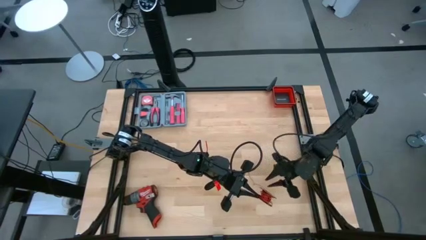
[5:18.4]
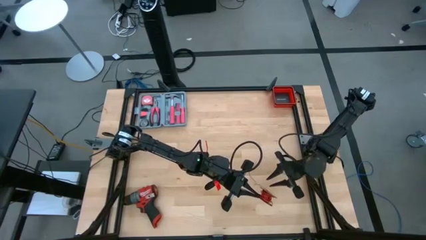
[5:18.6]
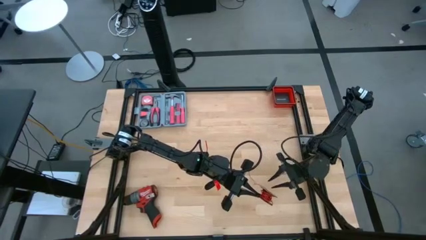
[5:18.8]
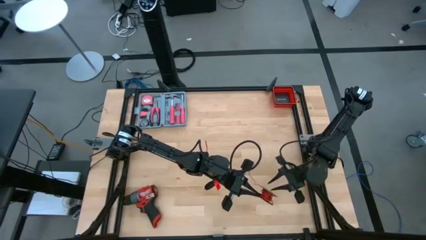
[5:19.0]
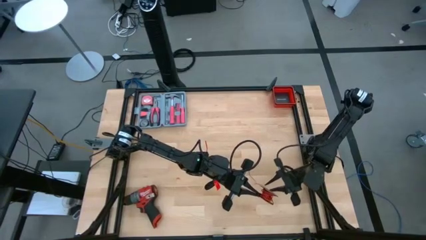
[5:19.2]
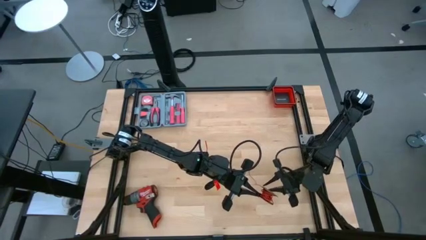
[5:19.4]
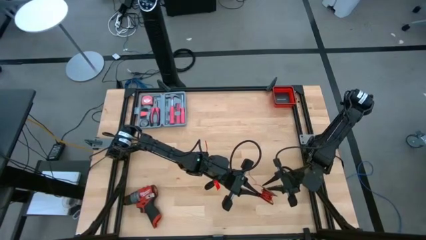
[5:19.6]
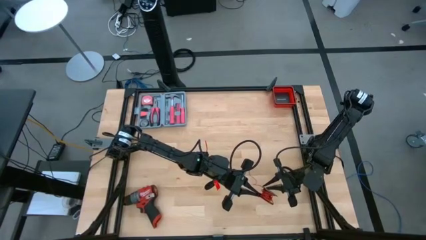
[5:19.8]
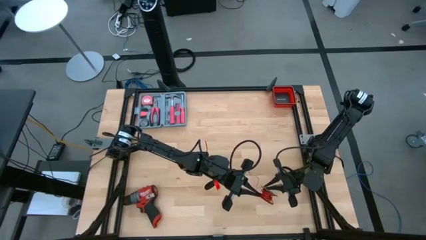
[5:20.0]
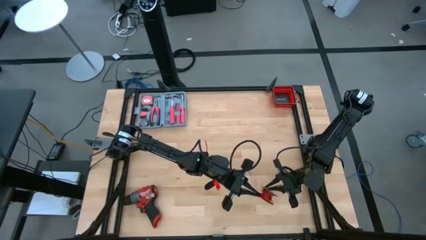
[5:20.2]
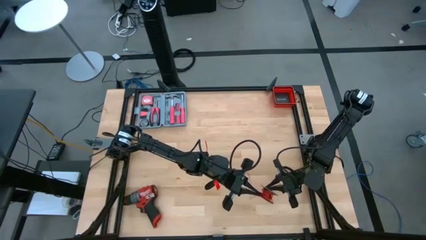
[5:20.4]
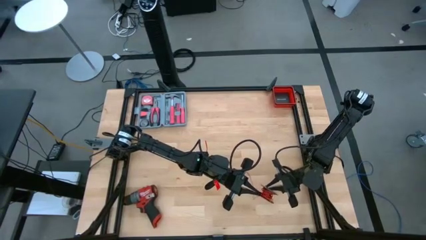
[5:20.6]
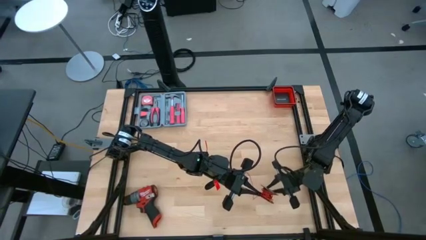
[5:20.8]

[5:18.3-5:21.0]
Task: Coil cords
Coil the red wire on the black spool

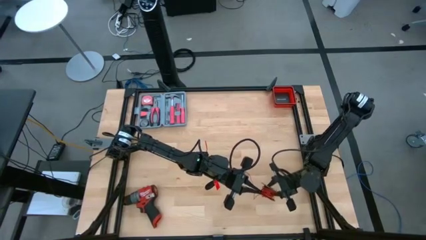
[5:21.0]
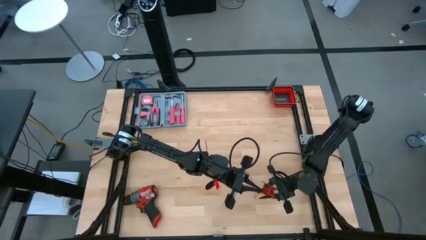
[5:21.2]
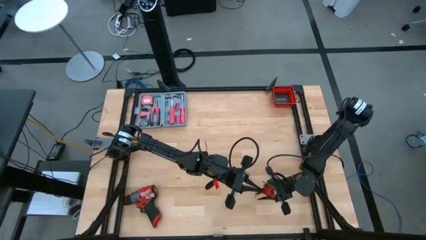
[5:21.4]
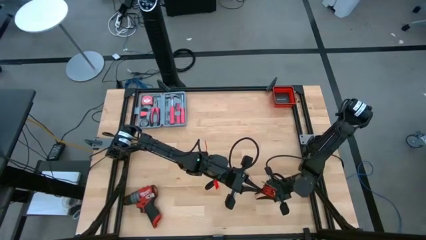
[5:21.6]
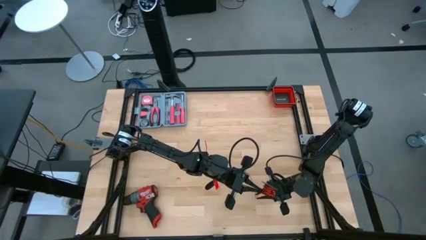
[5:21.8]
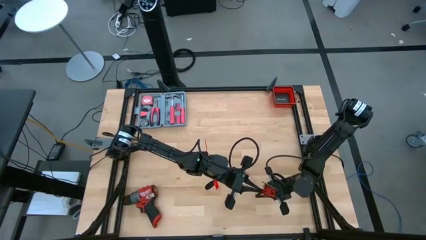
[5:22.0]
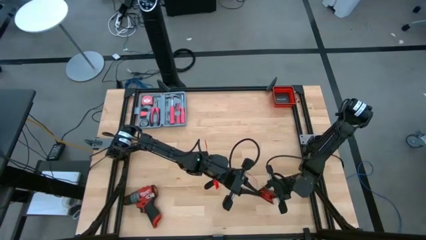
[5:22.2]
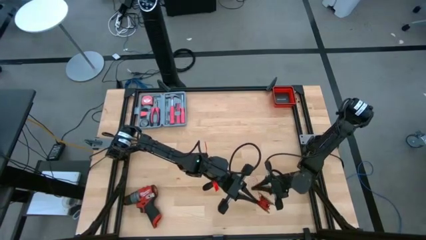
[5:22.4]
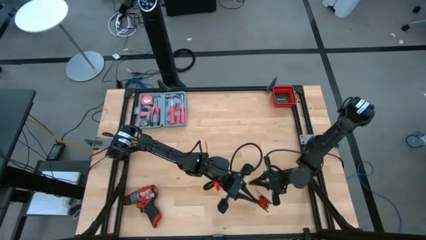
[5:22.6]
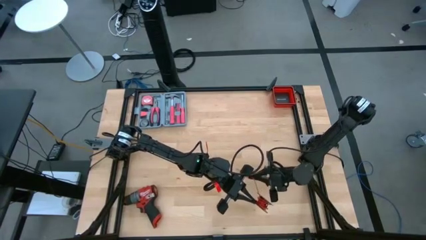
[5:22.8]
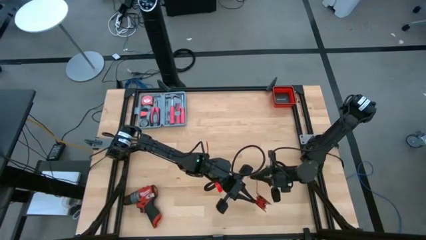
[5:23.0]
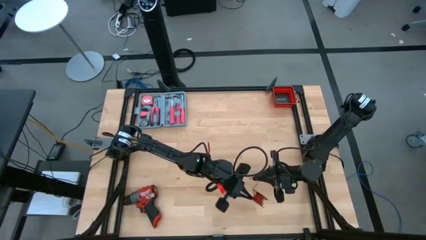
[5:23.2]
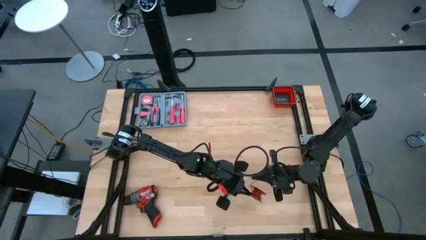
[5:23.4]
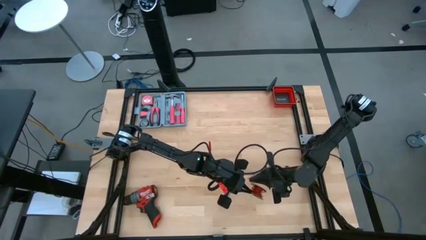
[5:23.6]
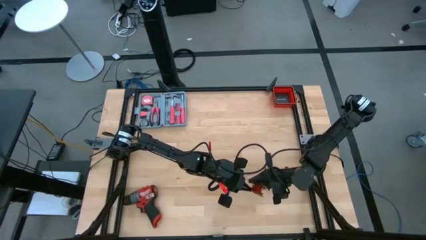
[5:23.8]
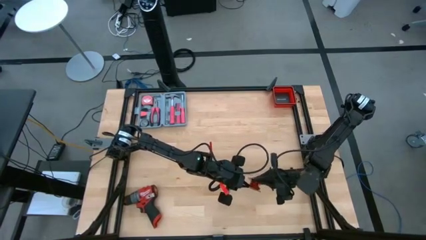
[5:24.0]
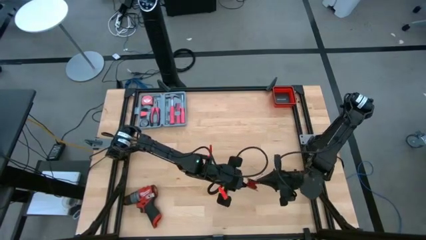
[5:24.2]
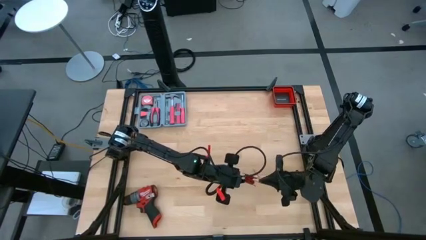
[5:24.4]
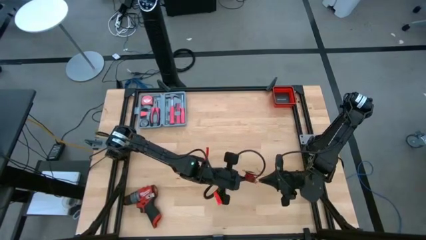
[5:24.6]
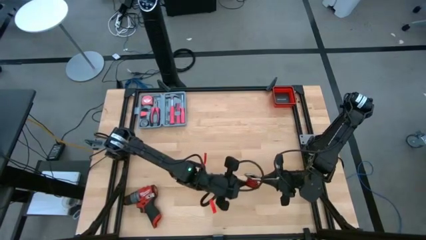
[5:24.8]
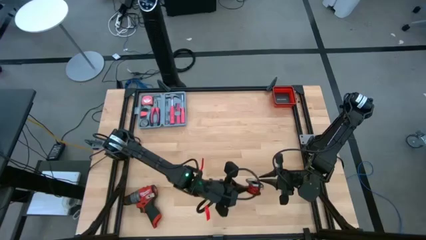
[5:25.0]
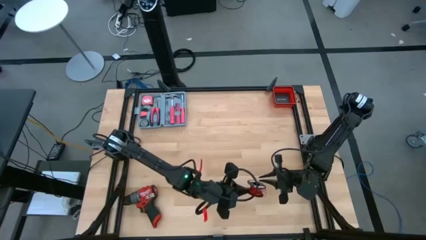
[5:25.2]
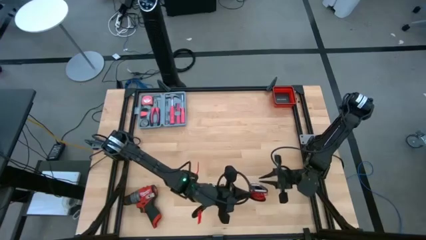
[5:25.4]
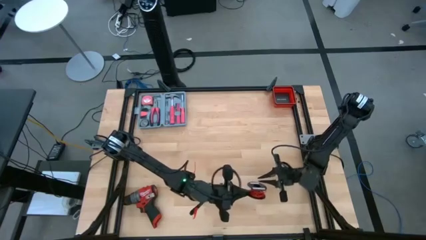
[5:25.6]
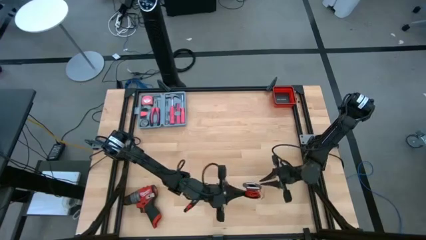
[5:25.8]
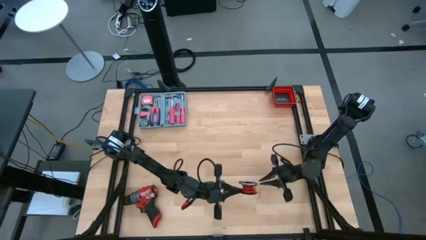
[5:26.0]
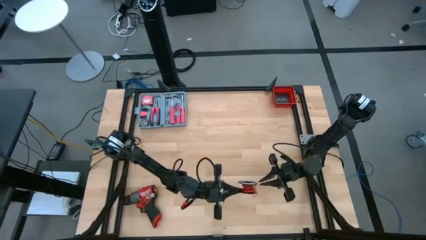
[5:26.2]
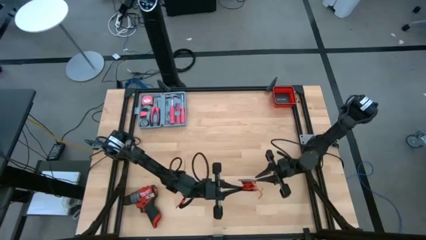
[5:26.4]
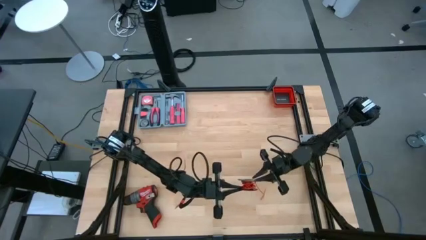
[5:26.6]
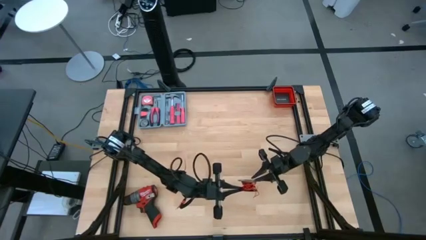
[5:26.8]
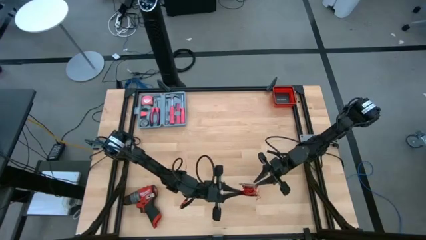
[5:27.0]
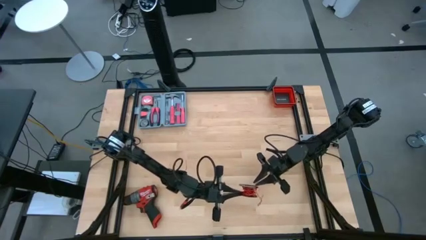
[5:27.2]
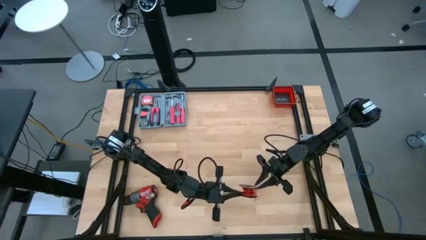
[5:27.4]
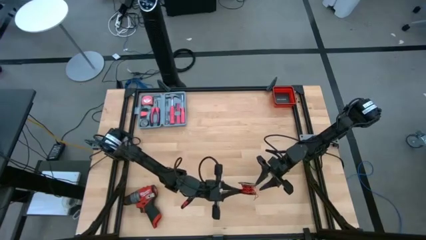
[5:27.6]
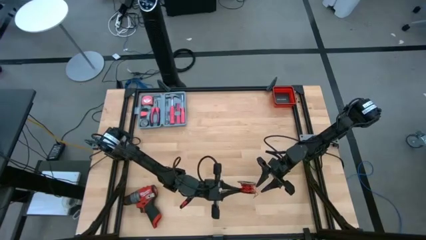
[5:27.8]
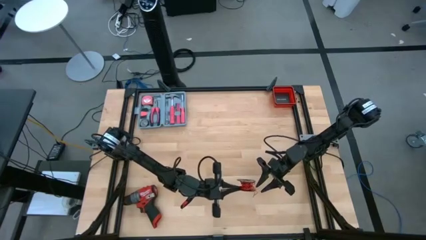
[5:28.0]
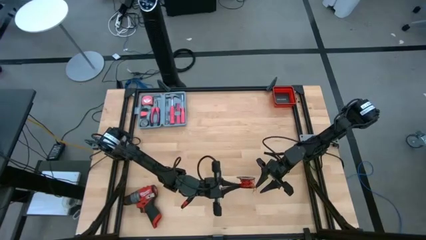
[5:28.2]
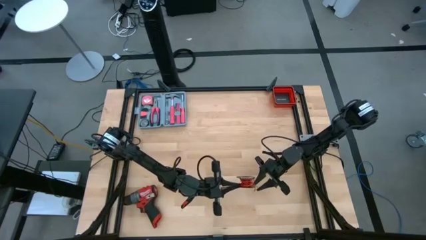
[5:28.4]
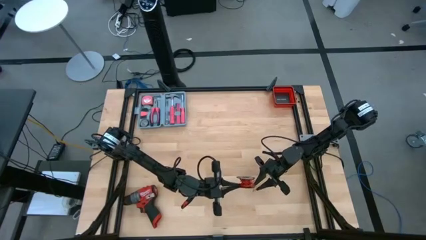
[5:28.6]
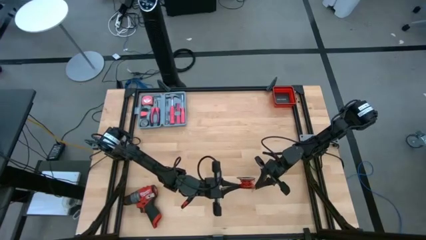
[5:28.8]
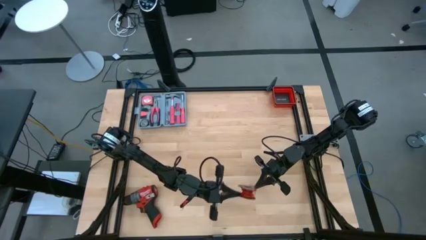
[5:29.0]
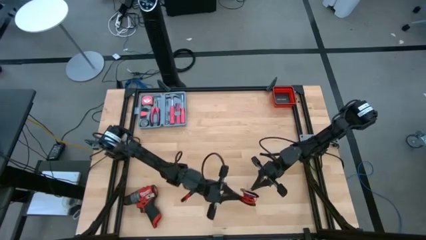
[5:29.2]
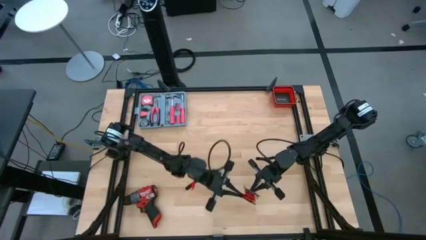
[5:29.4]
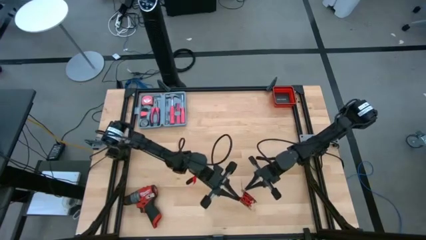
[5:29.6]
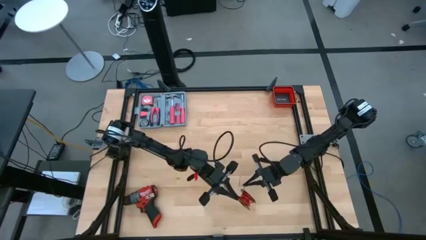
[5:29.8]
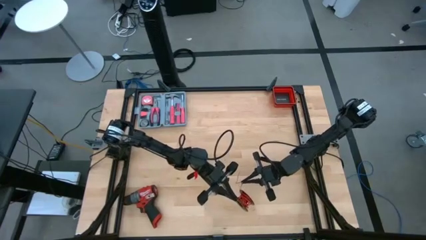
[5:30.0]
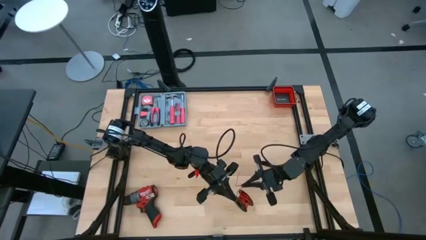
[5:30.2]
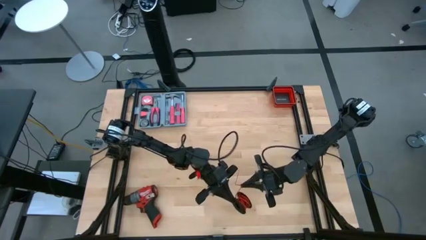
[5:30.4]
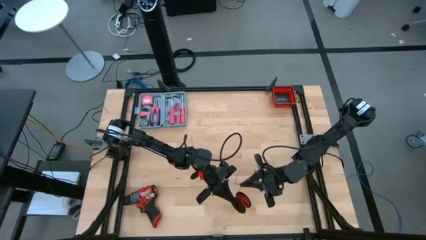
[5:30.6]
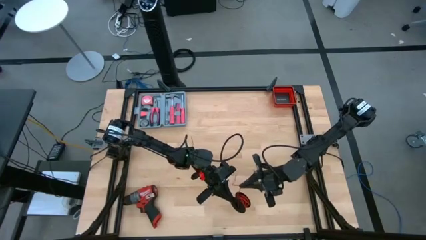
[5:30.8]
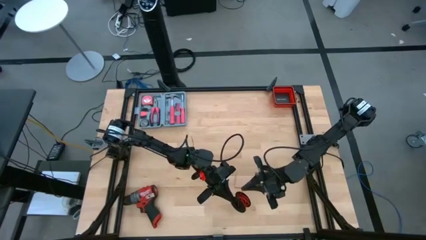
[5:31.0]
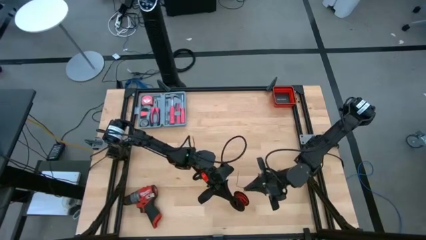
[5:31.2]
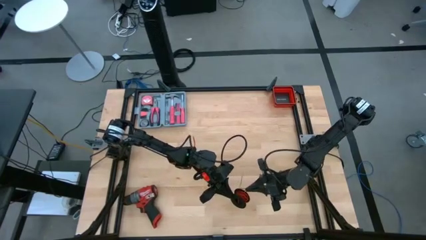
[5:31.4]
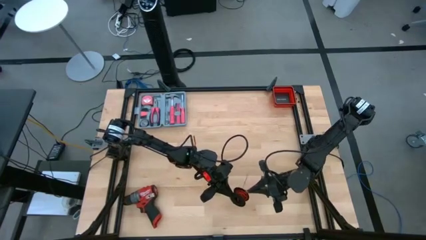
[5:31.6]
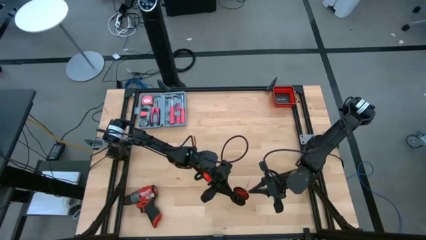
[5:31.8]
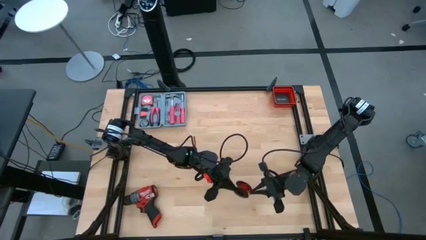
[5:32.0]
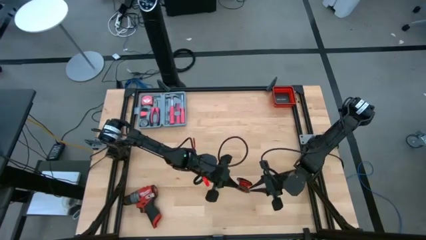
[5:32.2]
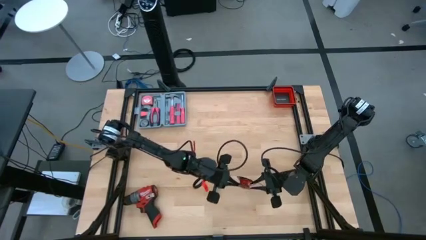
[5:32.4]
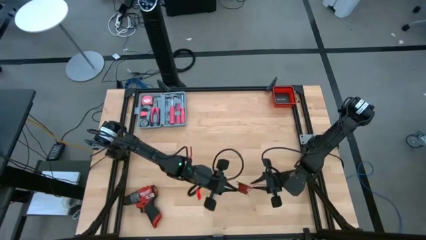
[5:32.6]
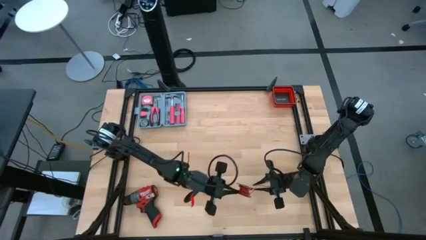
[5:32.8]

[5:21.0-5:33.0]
Coil the red wire on the black spool
